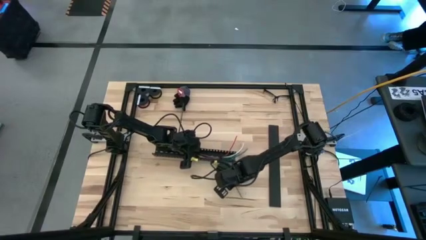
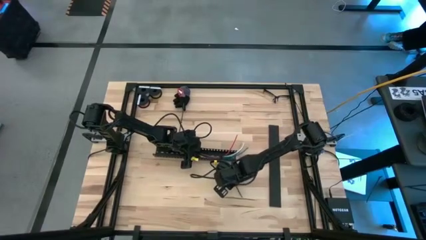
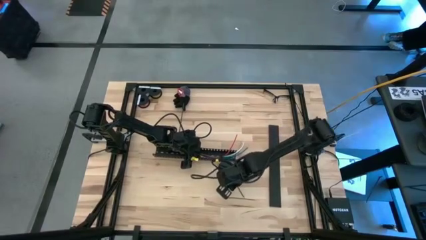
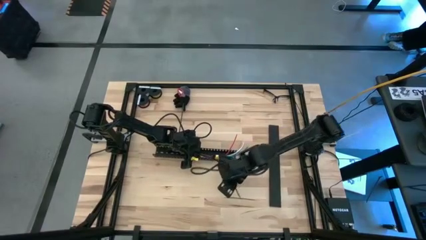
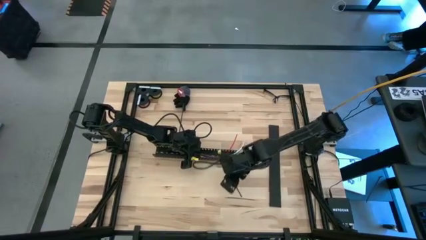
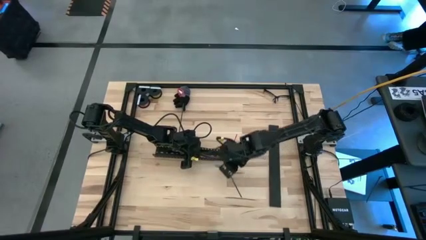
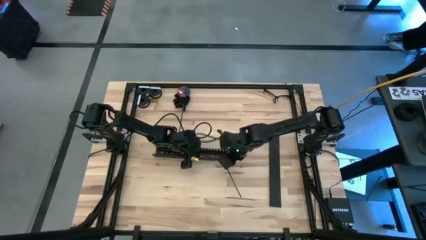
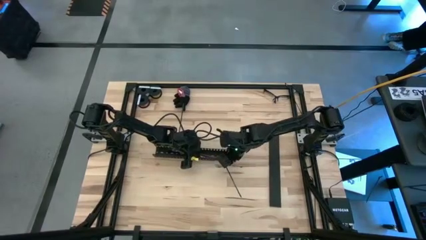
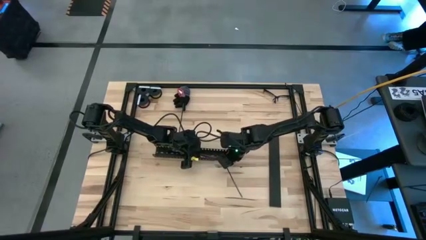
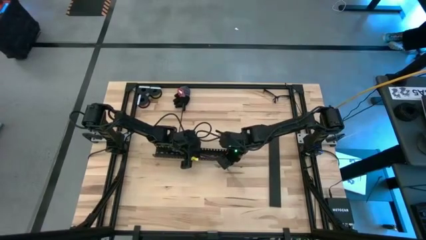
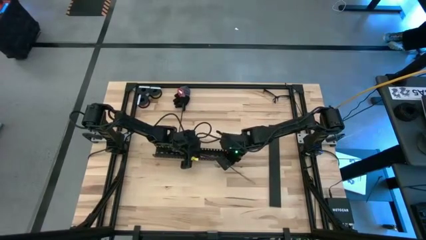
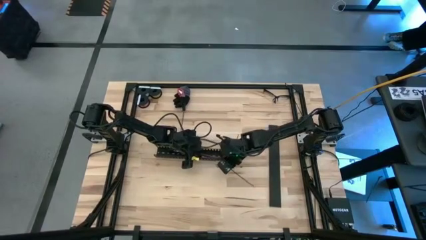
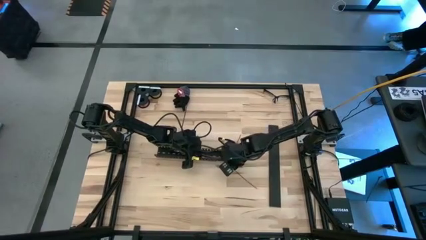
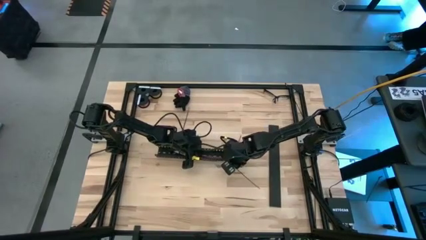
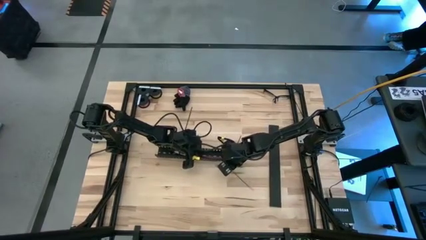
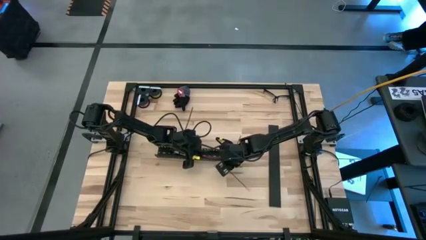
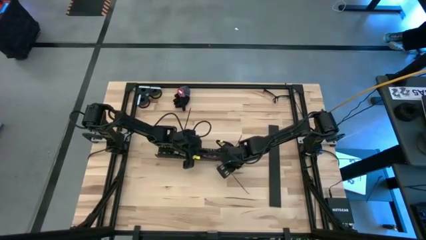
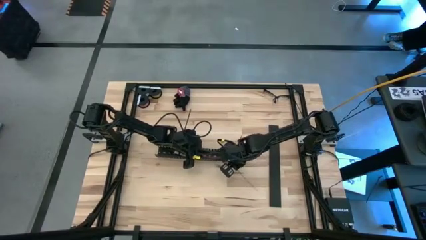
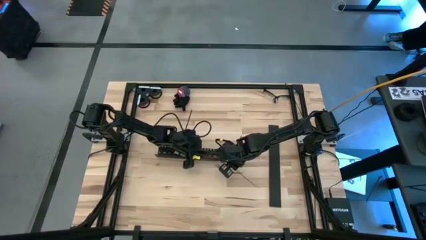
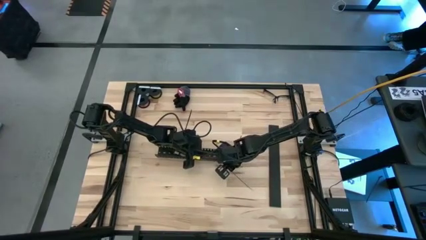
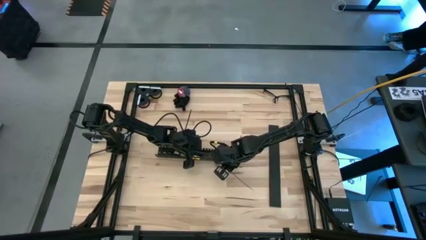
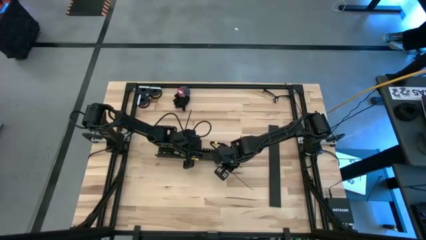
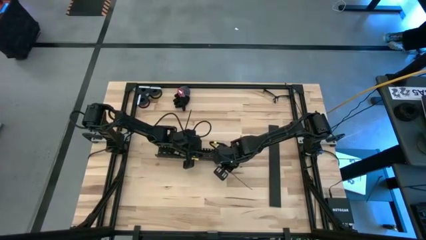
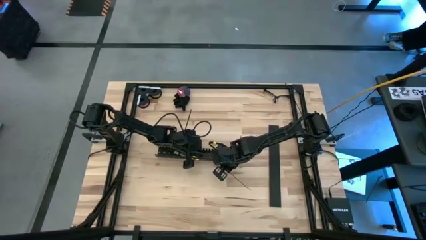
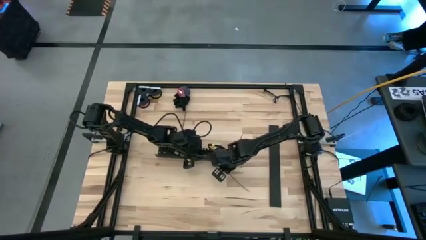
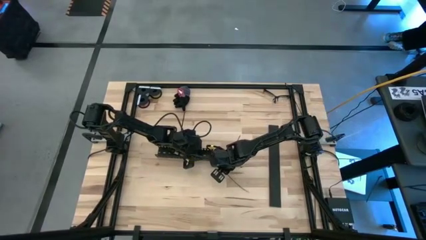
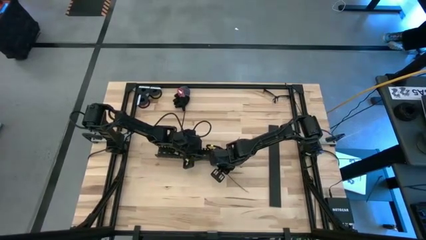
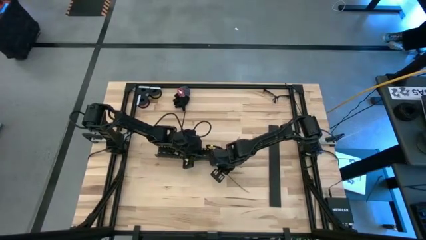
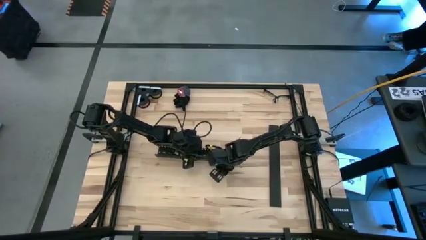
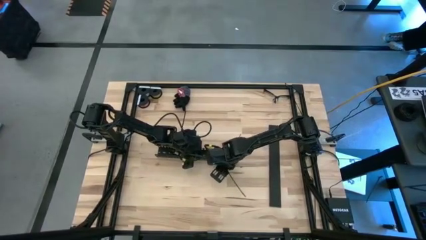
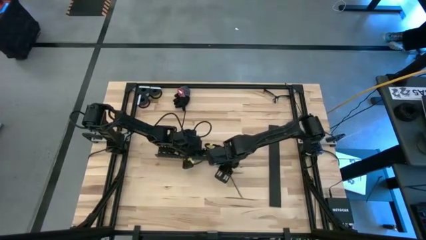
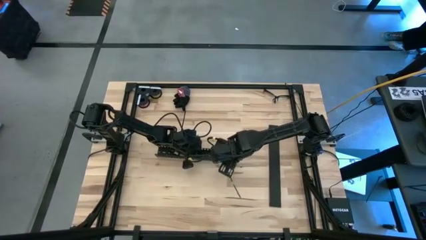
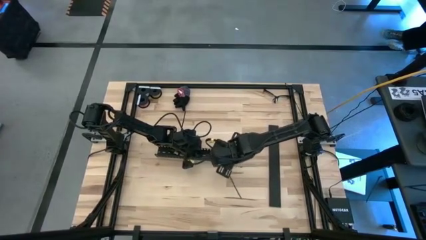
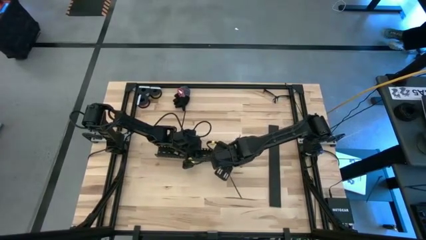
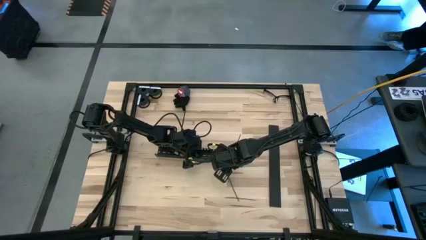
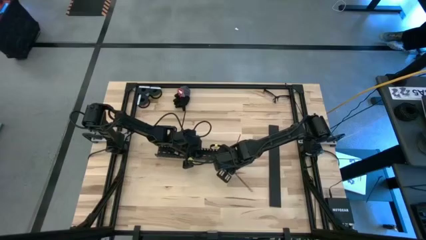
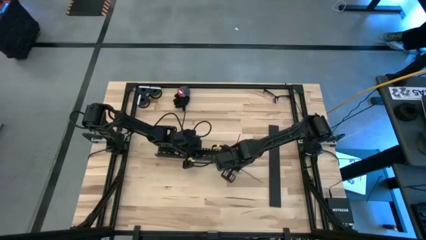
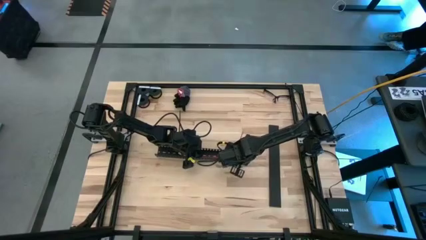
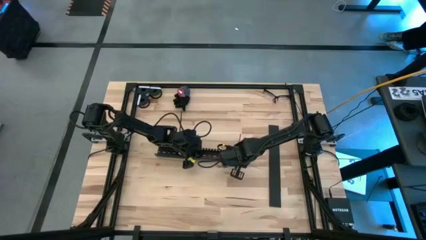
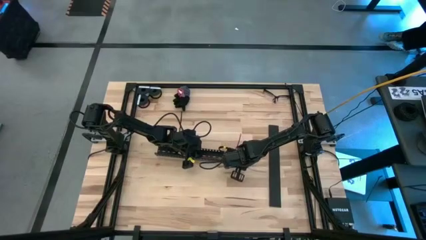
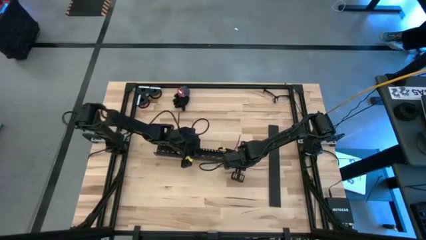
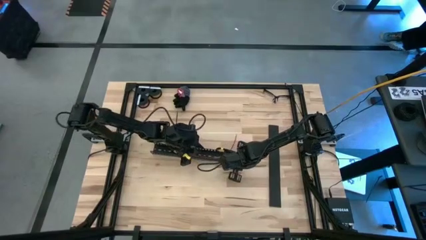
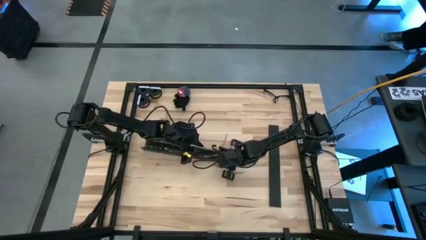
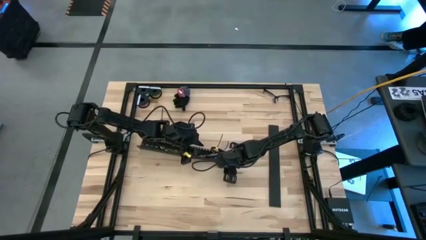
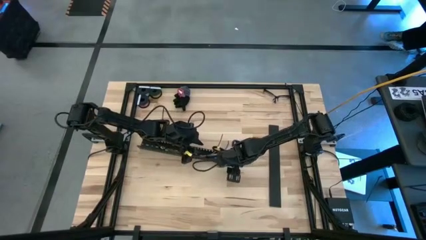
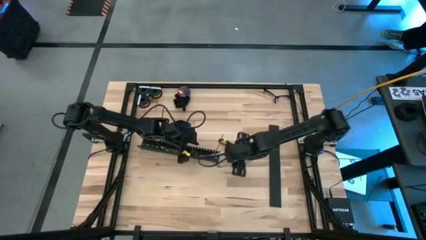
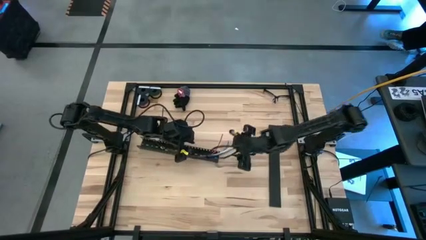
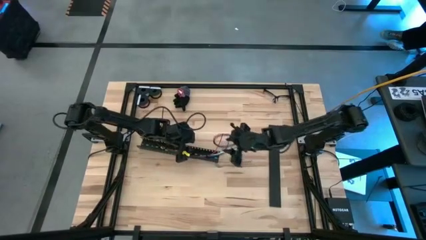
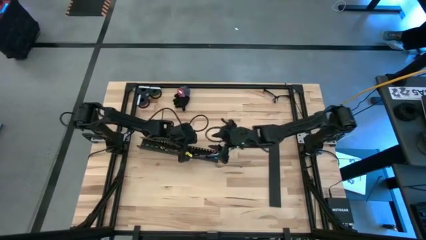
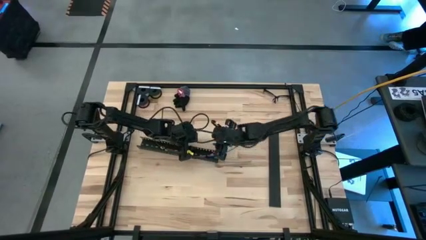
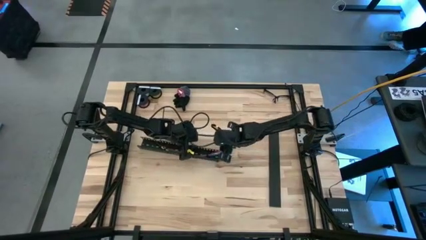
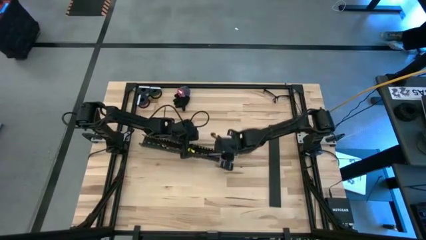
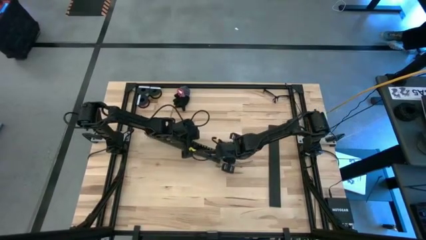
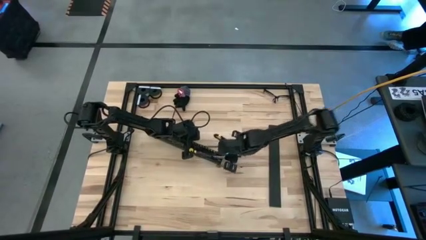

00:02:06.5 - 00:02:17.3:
Task: Ziptie cables
Put the zip tied cable wires into the black cable duct
